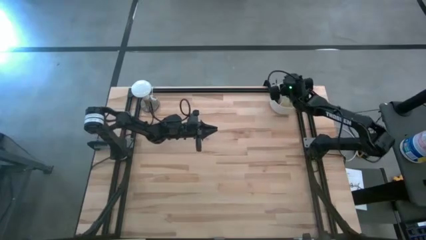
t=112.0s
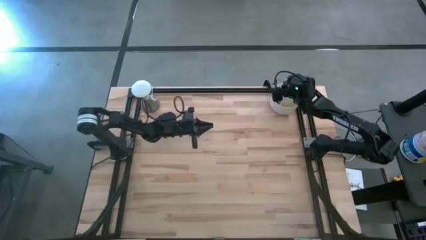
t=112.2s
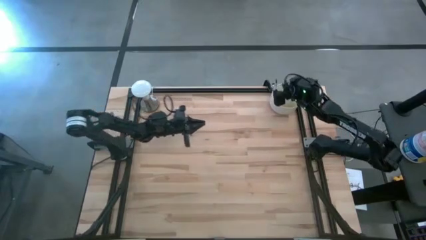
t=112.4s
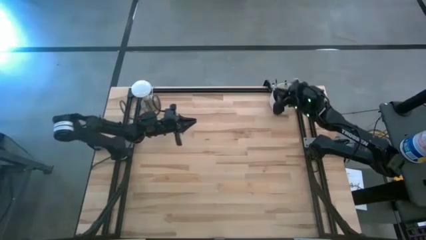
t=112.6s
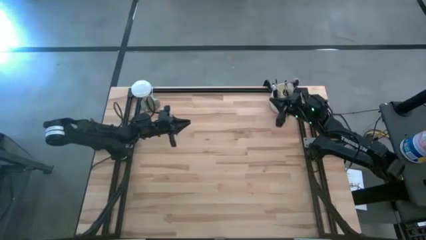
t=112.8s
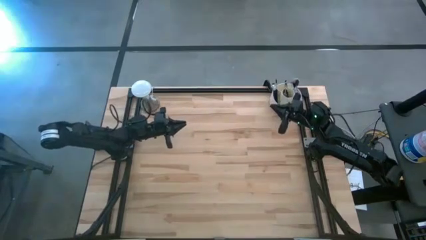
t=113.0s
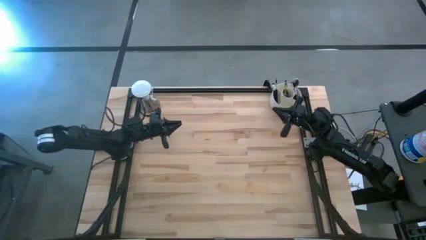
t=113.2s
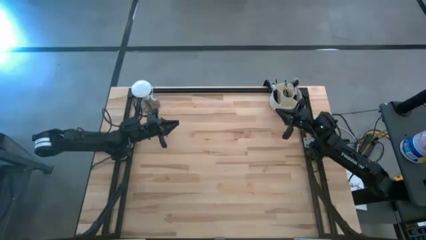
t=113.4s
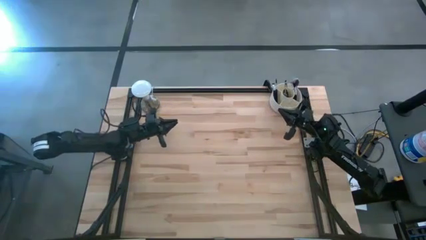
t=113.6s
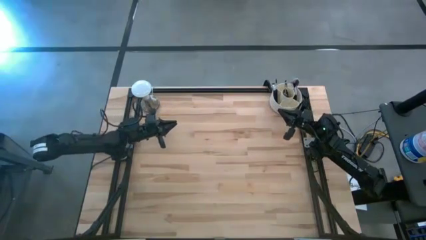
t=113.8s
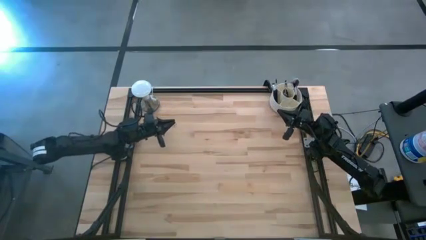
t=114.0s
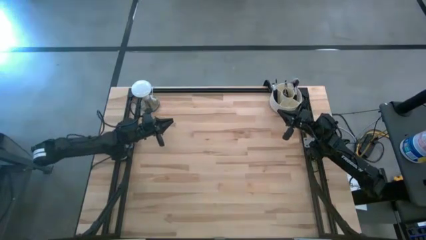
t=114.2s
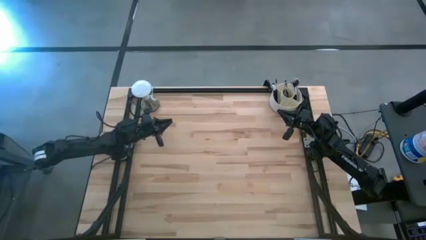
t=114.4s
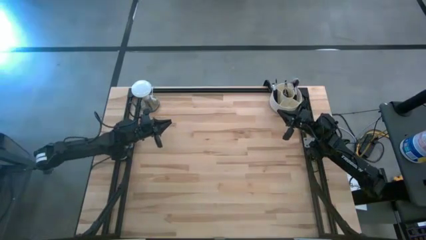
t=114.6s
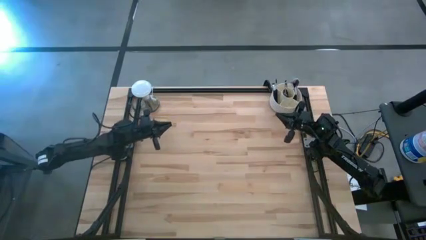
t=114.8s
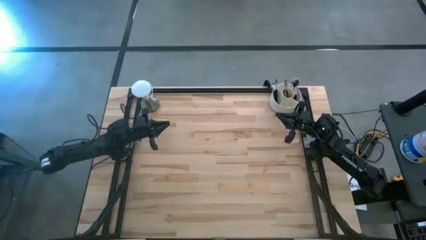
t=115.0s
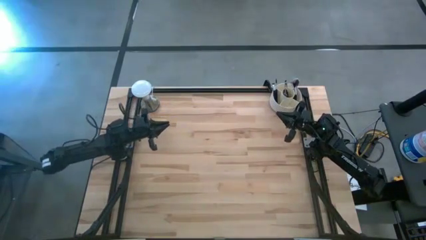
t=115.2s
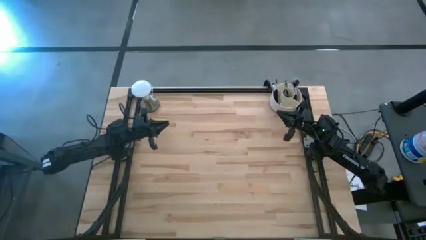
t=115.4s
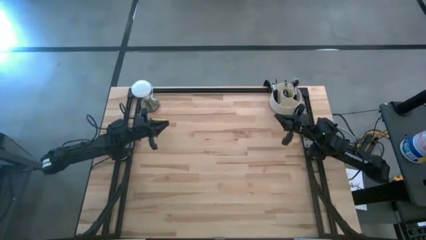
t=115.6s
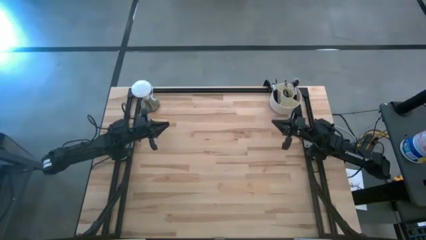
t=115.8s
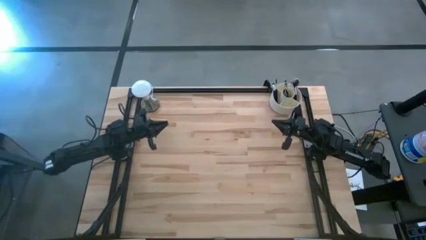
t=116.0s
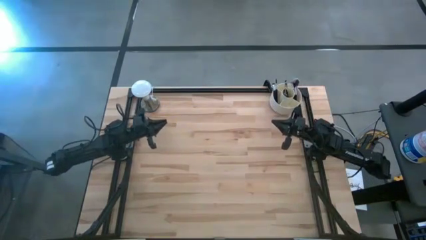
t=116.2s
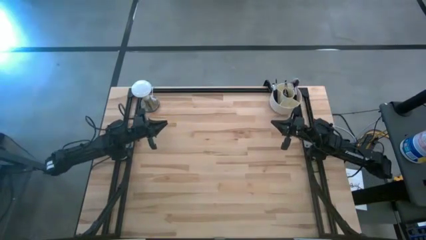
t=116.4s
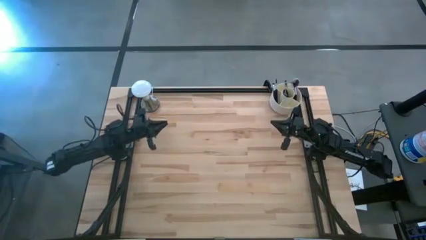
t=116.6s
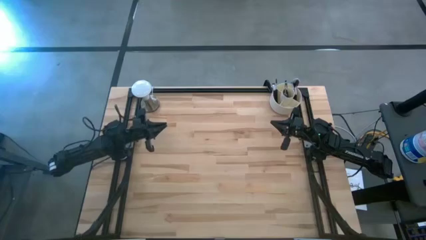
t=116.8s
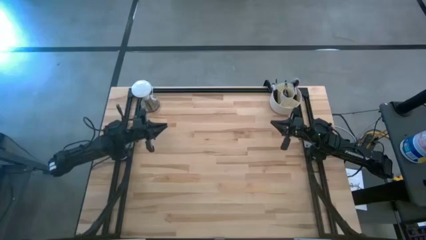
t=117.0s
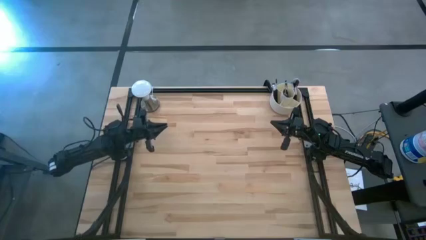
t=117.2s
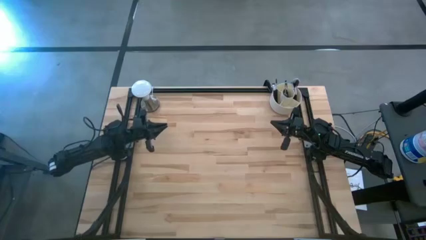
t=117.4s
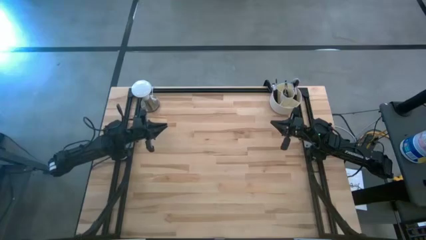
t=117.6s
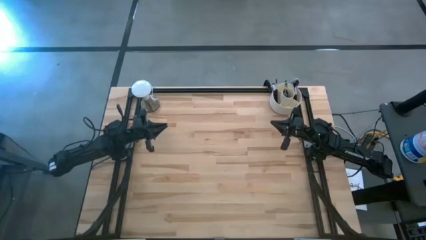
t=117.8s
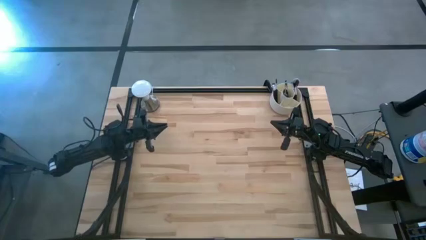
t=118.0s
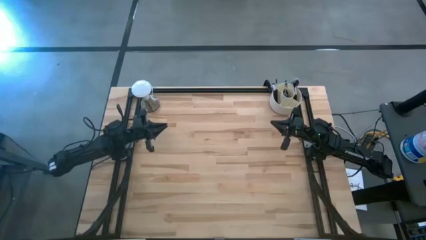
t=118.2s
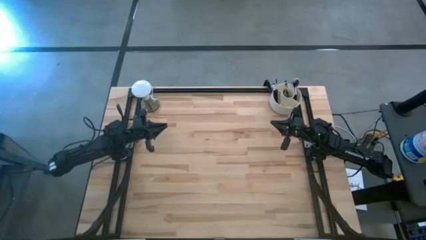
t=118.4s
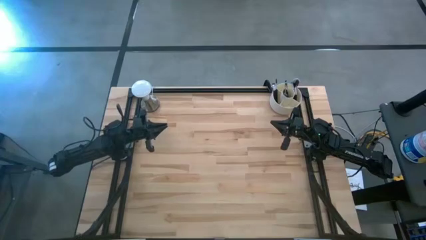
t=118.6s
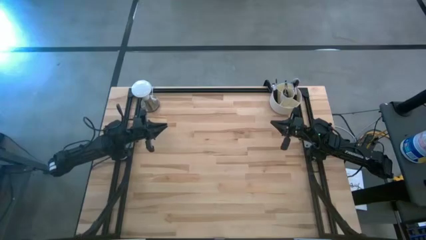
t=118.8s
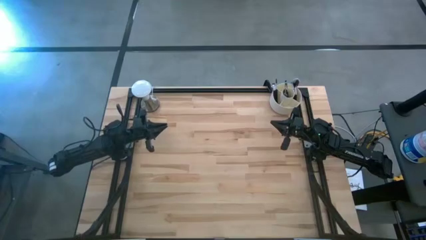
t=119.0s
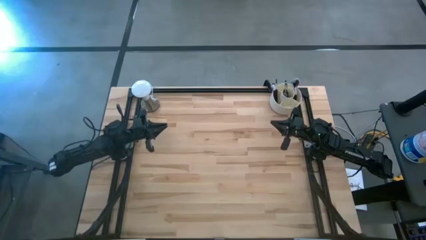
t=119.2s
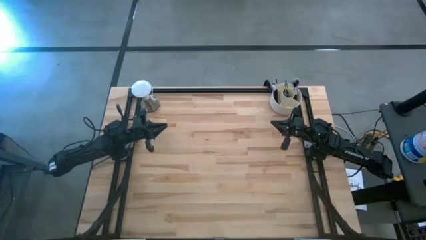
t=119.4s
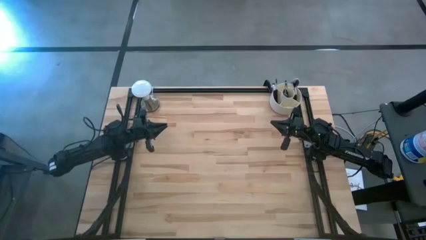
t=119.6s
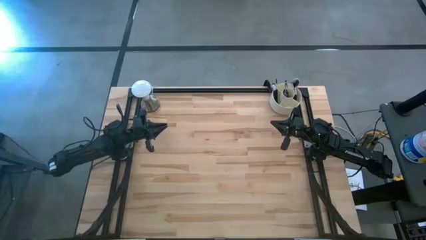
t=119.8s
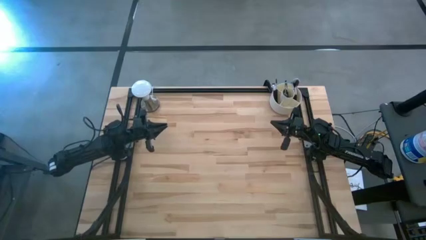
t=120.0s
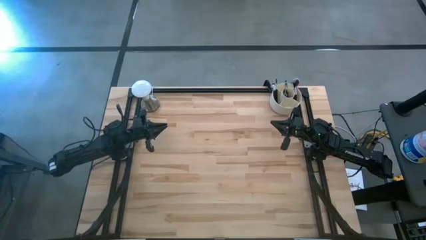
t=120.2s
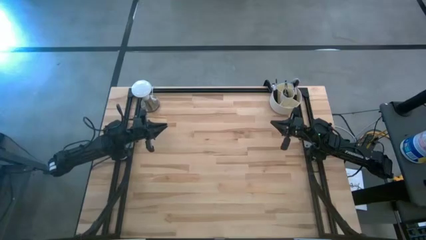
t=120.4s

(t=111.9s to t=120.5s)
Task: Pick & Place Makeup Brushes
Return to Home Position

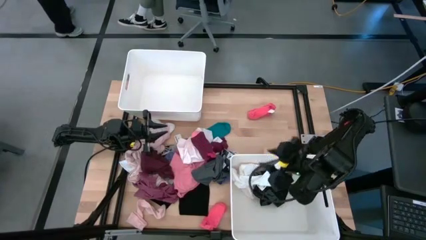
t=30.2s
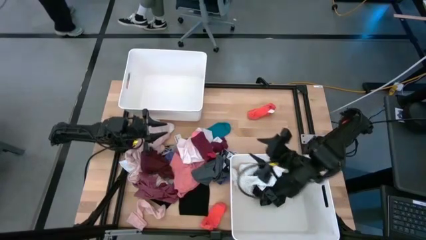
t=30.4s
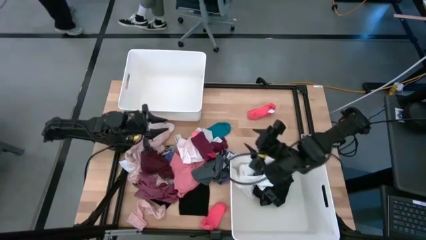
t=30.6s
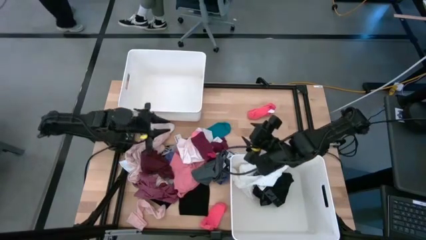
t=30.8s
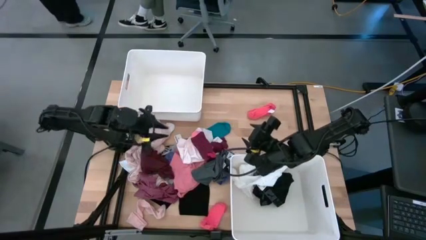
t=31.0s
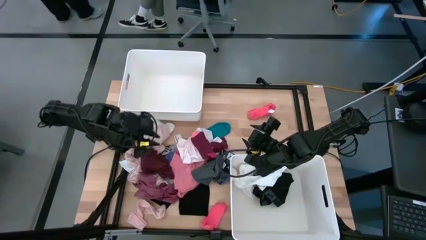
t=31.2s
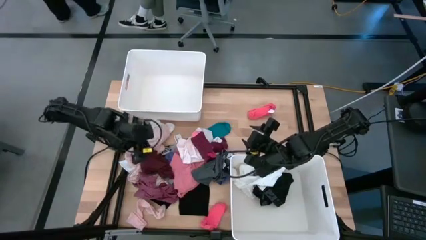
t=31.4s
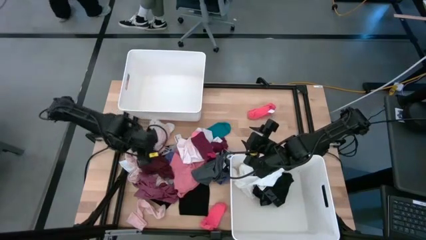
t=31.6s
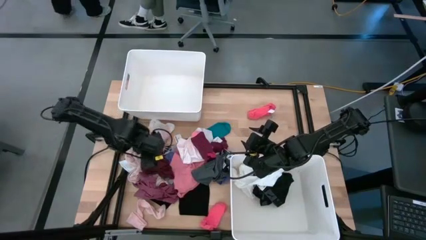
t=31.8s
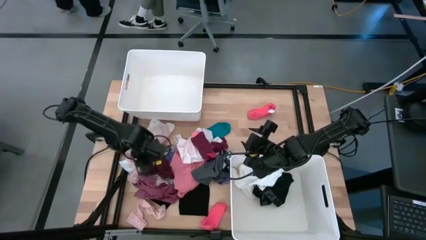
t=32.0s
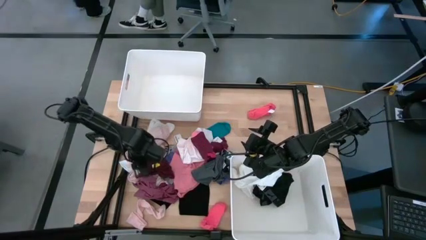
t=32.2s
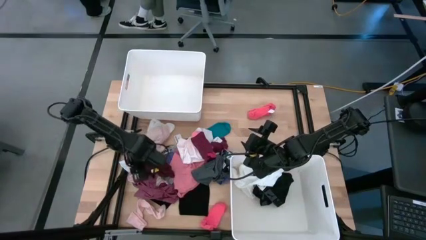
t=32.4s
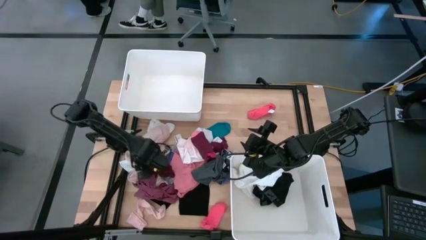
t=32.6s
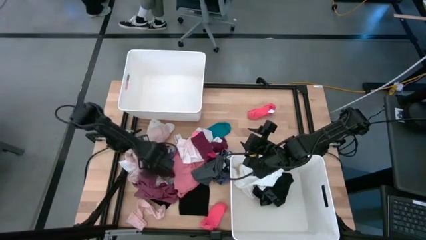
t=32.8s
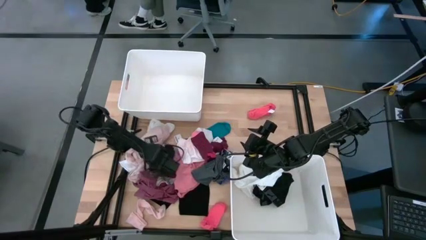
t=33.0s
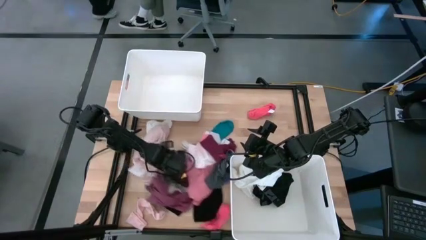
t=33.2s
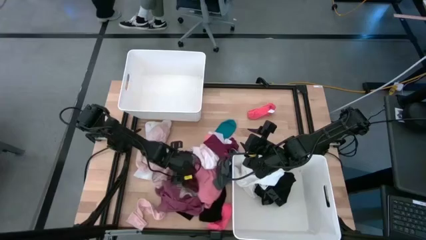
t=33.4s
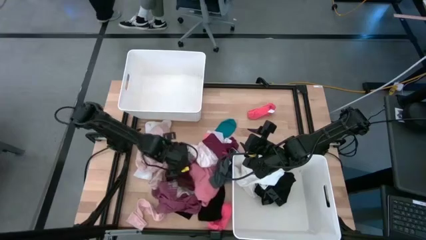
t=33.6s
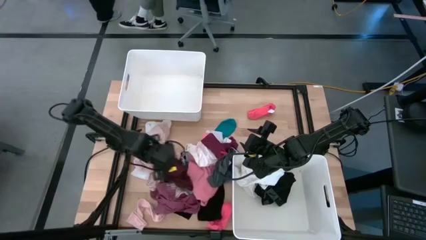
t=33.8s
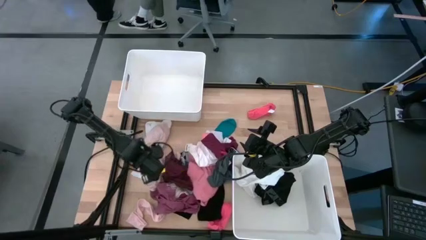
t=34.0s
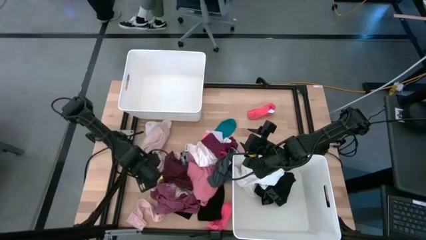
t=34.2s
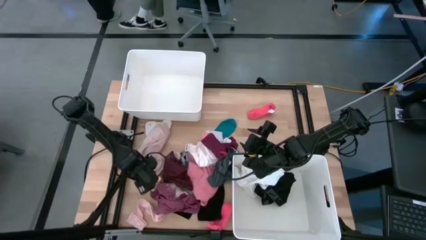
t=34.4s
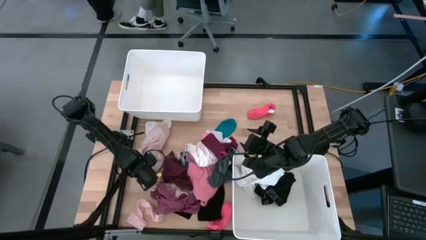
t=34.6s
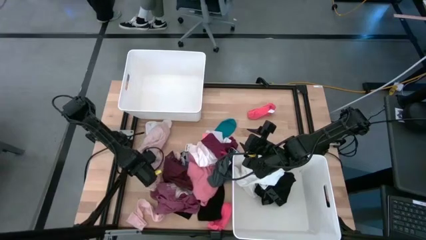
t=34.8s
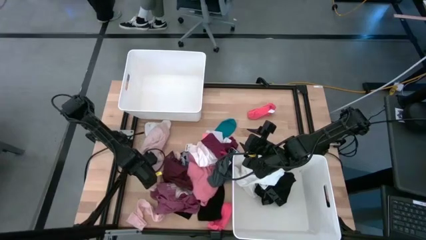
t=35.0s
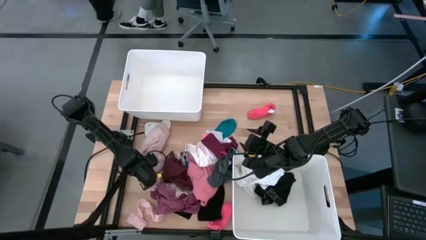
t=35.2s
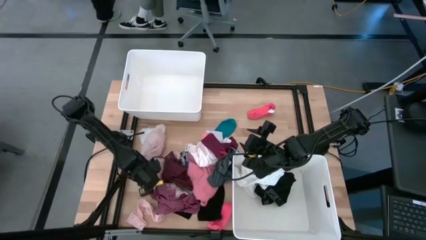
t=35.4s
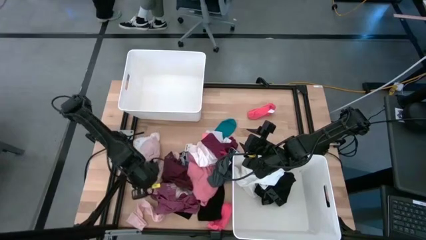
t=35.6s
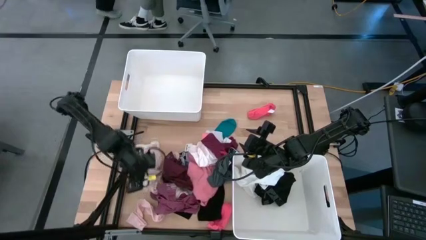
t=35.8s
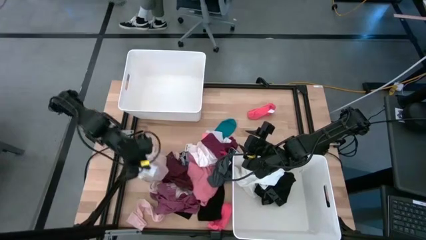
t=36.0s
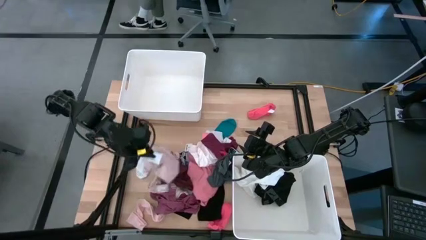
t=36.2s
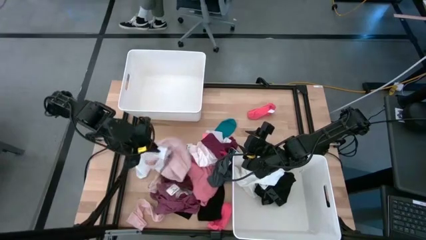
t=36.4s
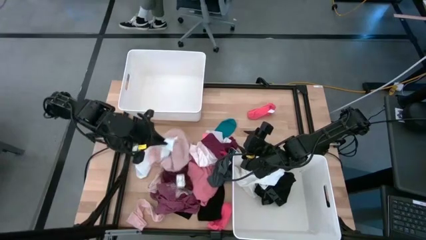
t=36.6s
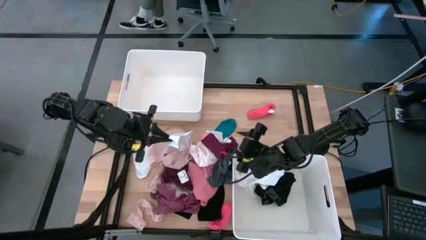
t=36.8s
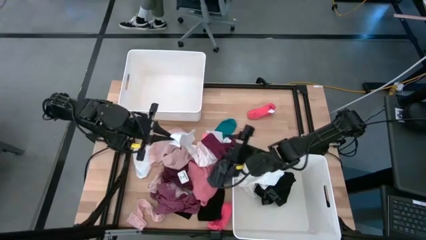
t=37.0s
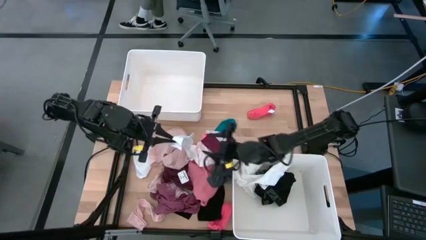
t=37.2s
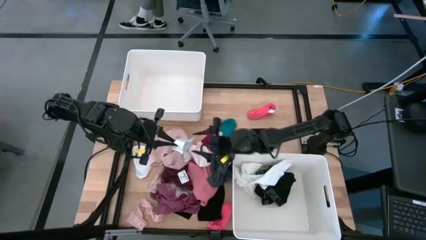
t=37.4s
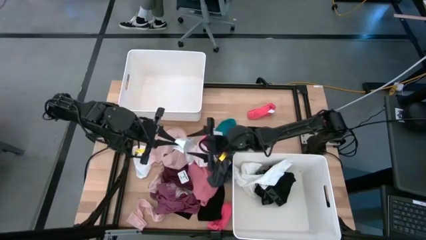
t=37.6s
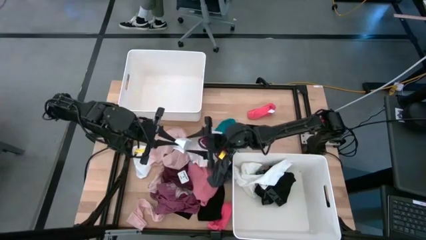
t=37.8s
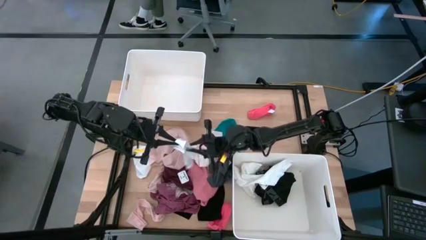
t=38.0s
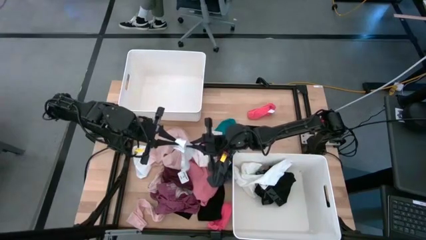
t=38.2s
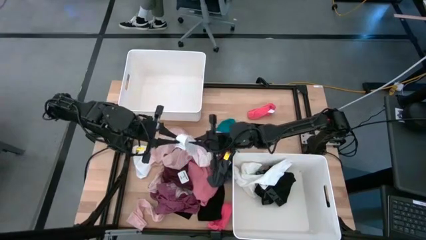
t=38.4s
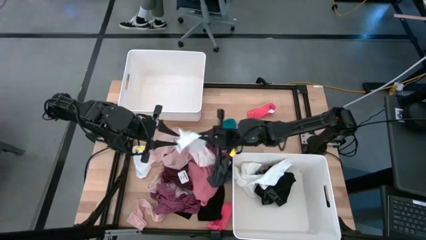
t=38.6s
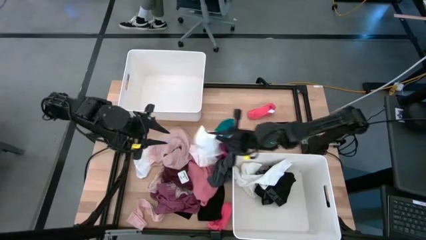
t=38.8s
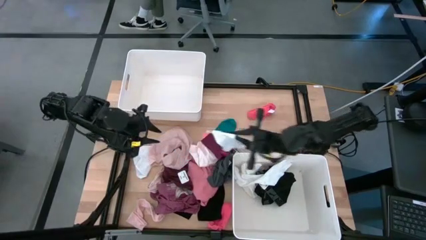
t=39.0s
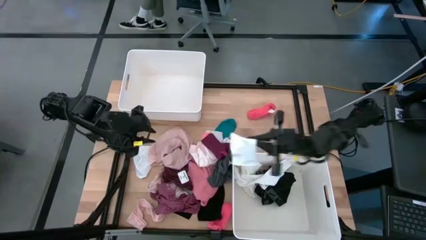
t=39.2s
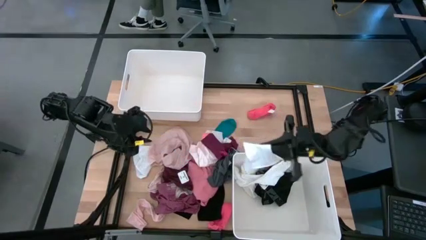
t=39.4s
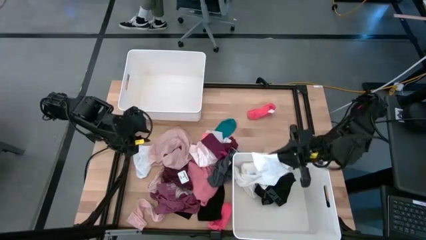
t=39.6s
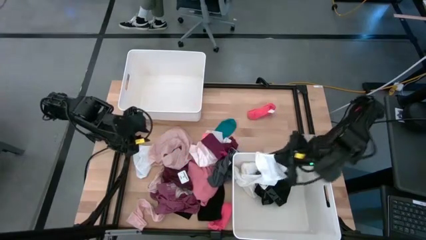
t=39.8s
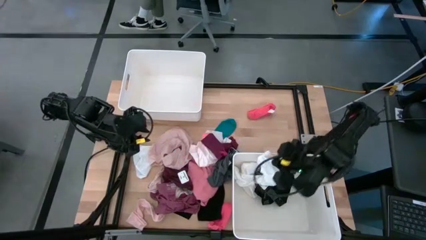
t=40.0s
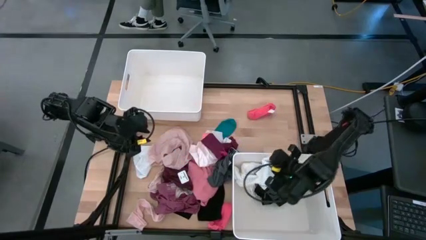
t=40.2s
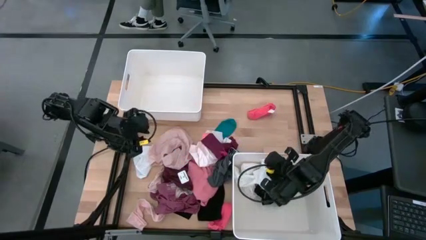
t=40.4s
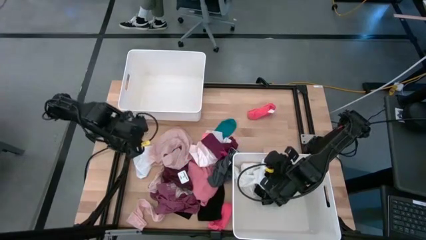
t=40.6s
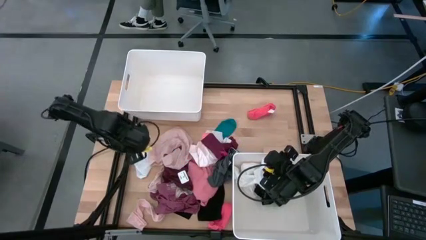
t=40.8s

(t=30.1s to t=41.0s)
Task: Sort clothes
Put the white sock into the bottom white bin
